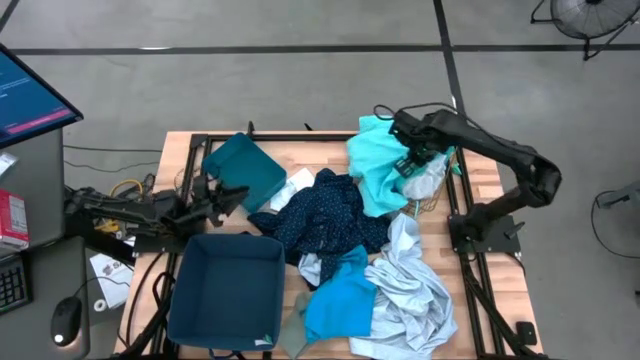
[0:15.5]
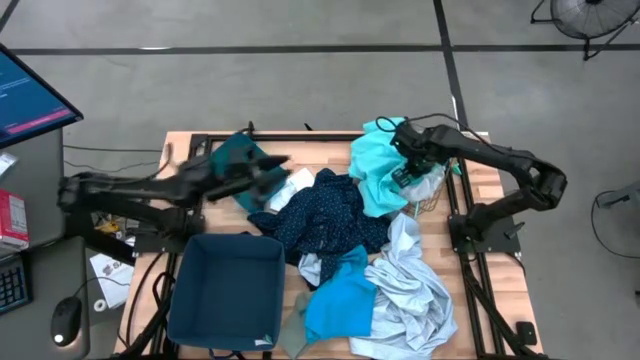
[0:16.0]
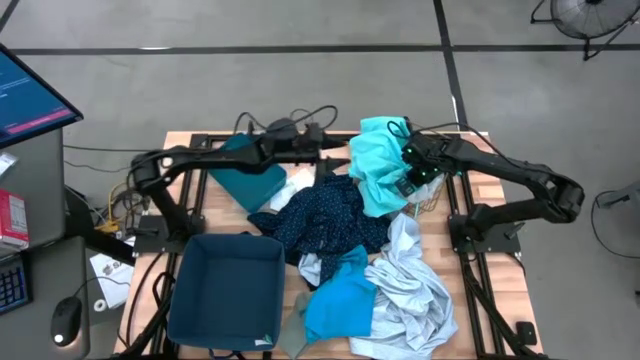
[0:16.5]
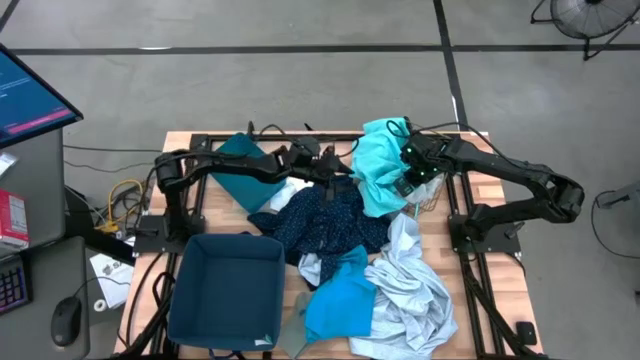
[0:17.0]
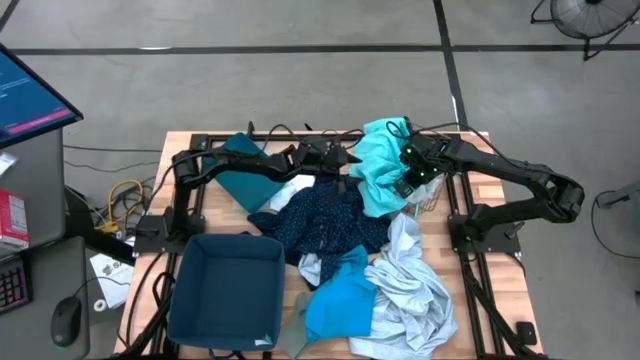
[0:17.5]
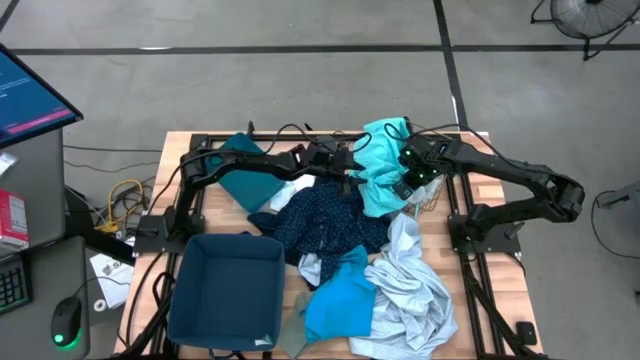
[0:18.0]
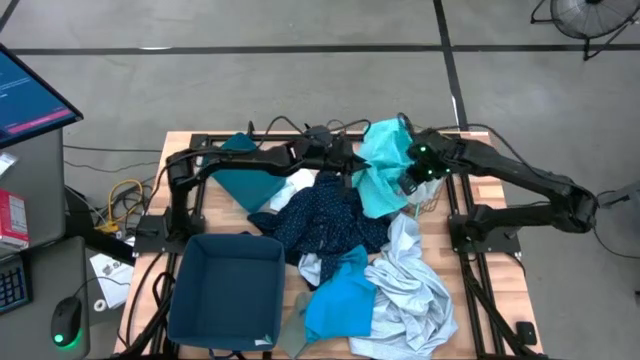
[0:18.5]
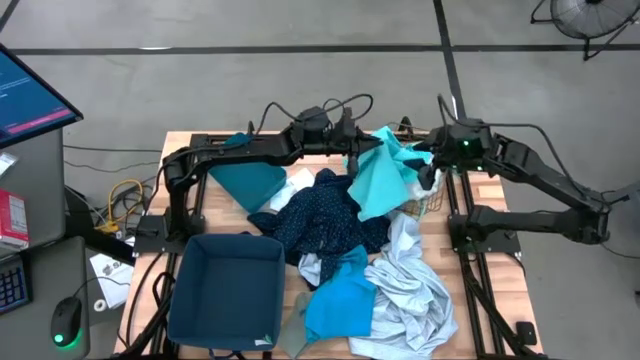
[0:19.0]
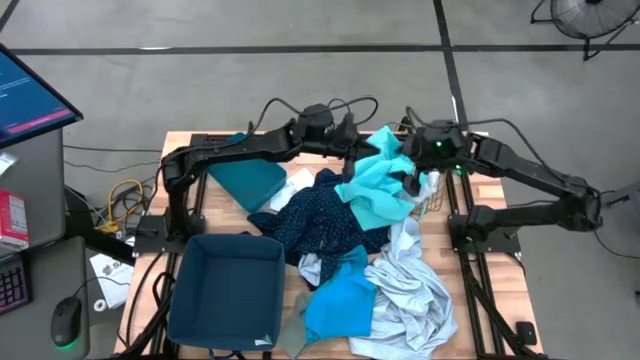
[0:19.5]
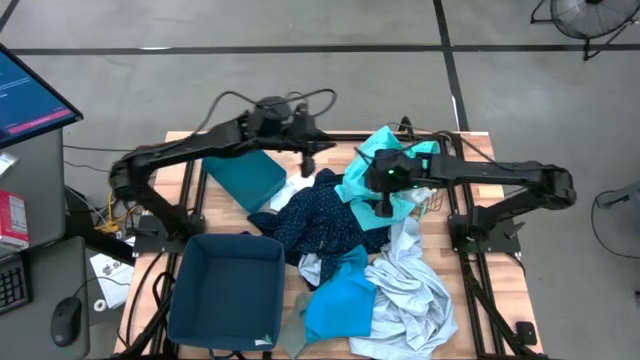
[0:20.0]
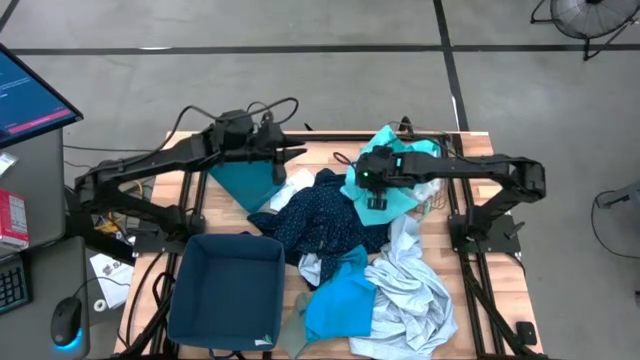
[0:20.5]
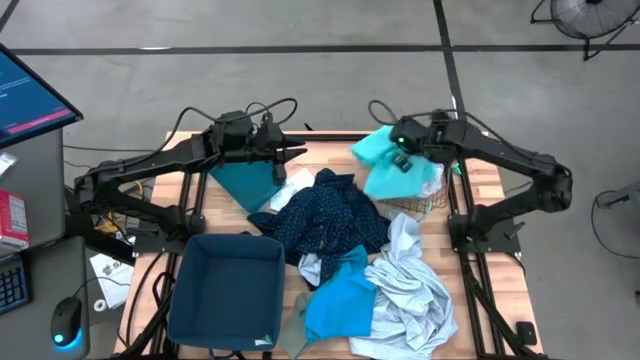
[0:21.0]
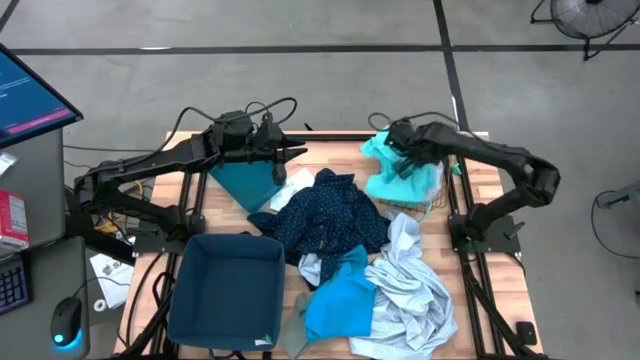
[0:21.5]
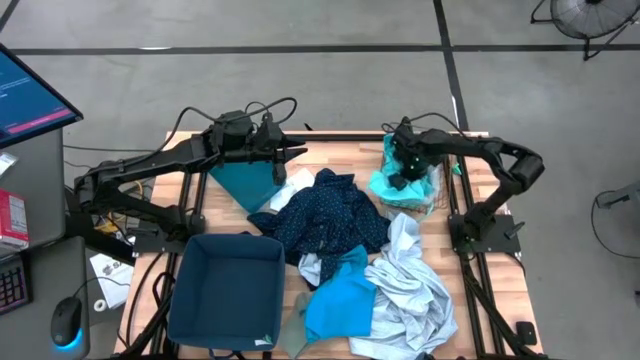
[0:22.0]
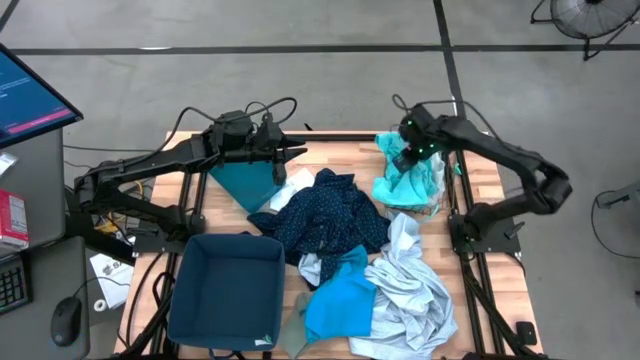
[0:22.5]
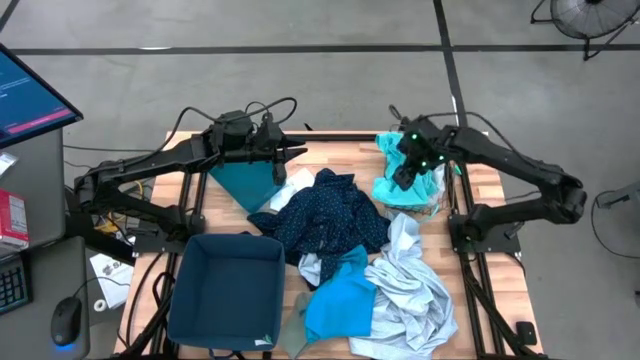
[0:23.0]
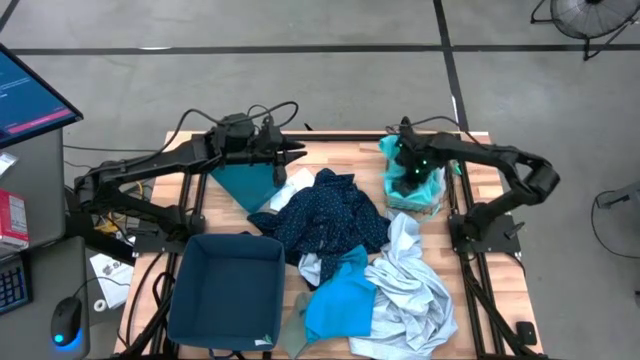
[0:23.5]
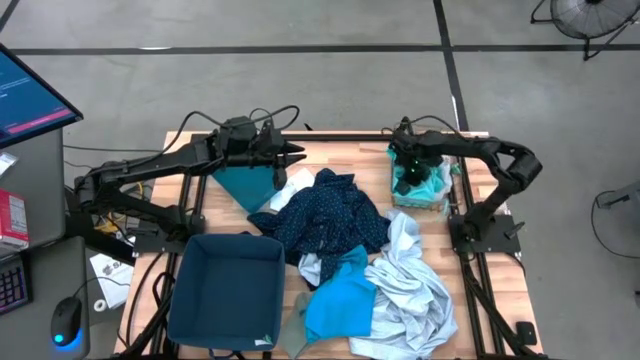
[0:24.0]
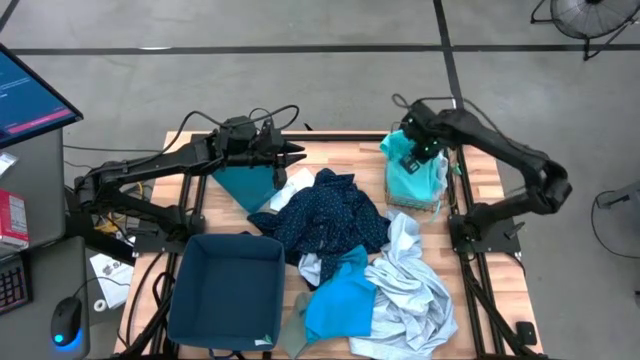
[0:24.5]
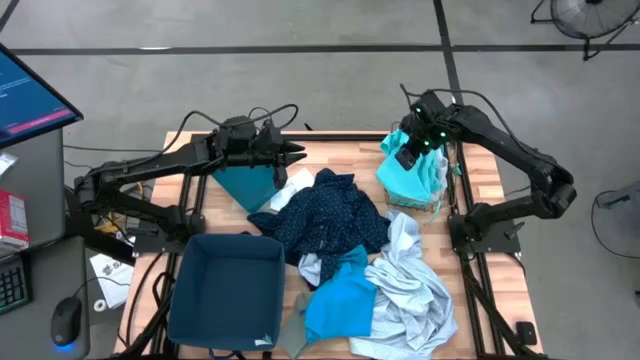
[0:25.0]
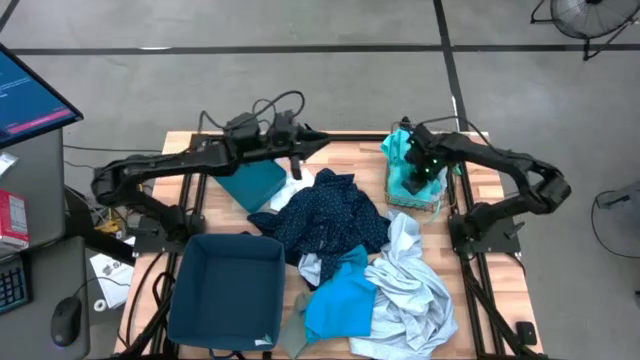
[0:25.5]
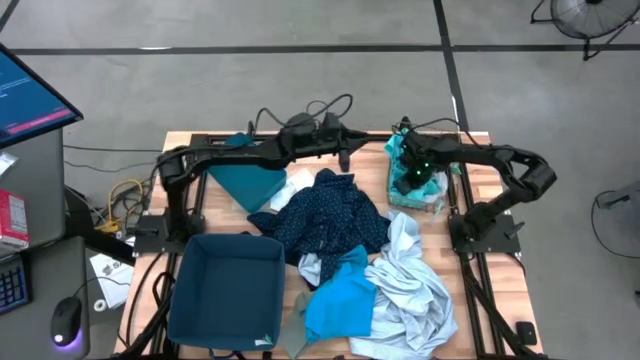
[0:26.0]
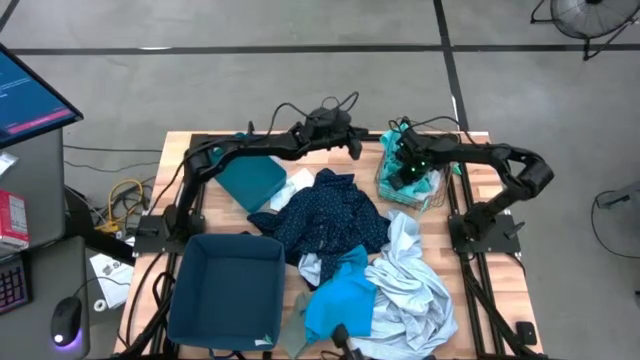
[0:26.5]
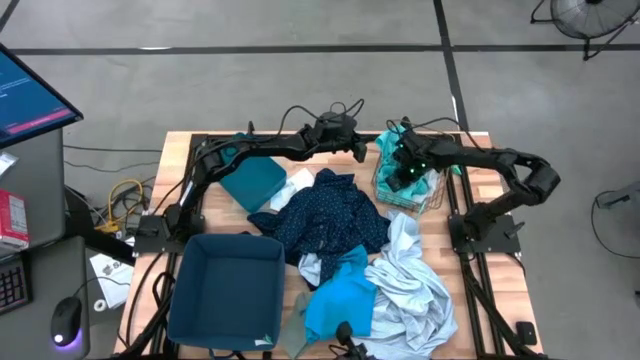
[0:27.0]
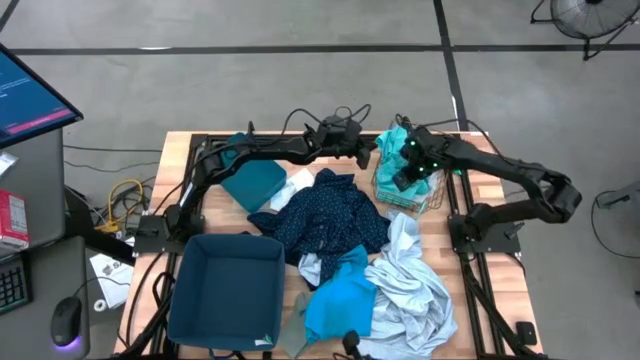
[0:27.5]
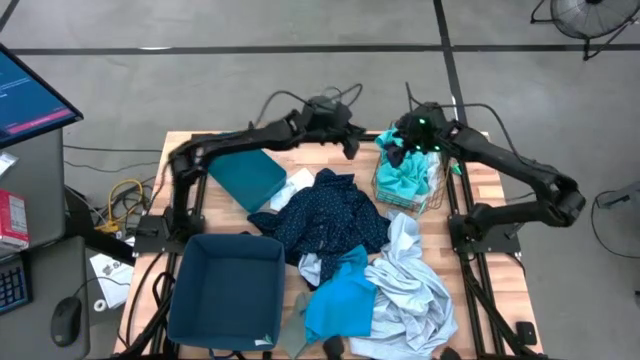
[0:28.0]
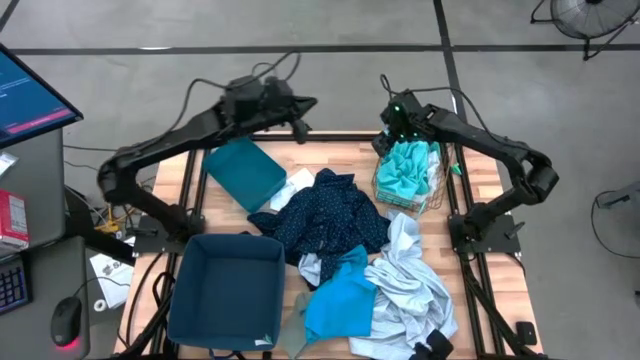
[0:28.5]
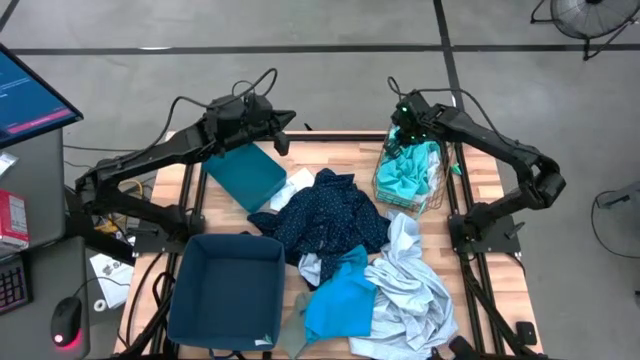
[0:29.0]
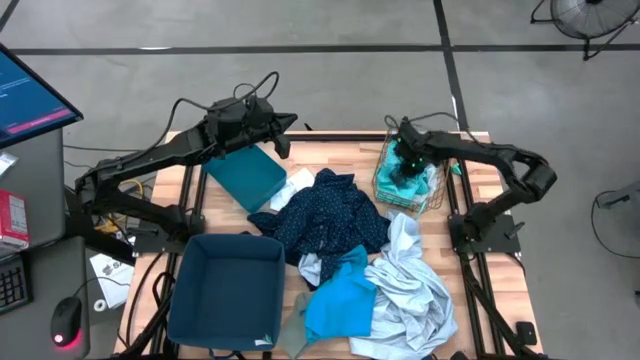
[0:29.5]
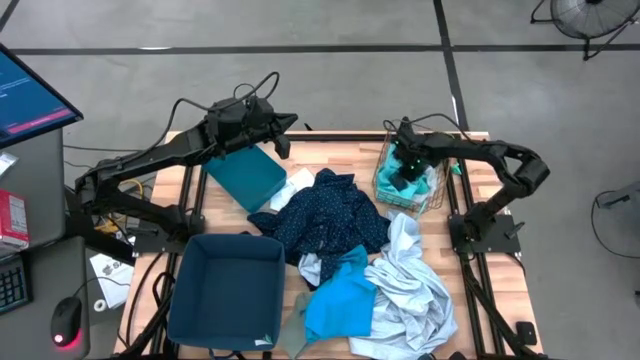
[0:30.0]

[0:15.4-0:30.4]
Task: Pick & Place Cloths
Put the light blue shorts into the wire basket

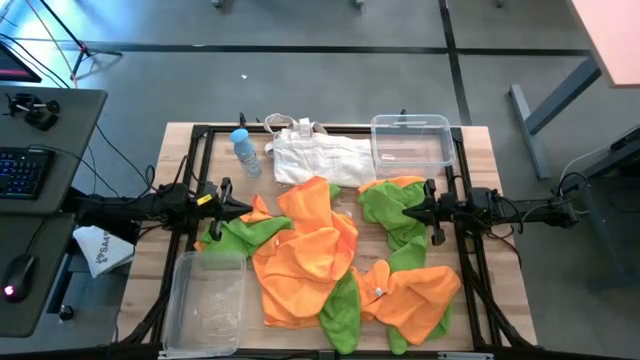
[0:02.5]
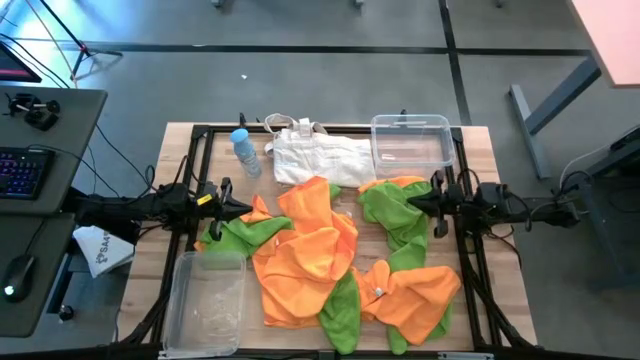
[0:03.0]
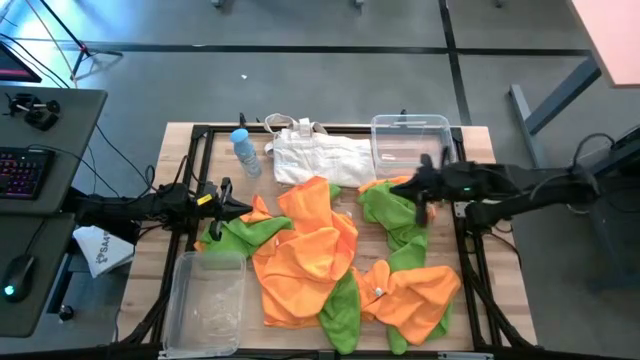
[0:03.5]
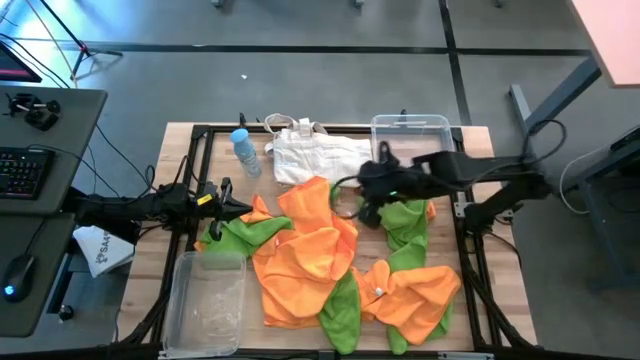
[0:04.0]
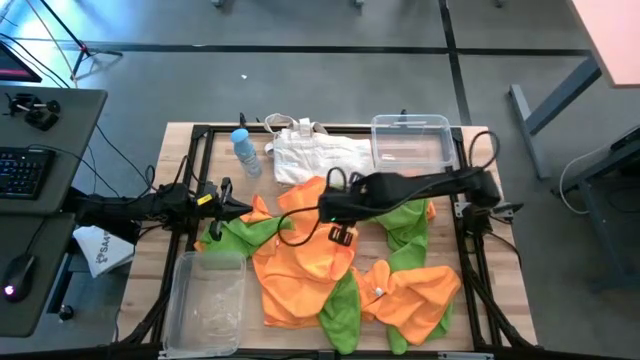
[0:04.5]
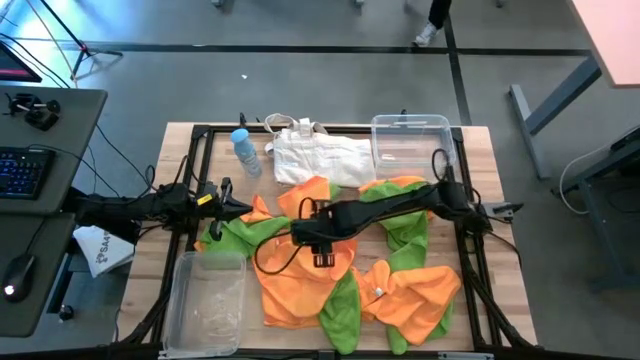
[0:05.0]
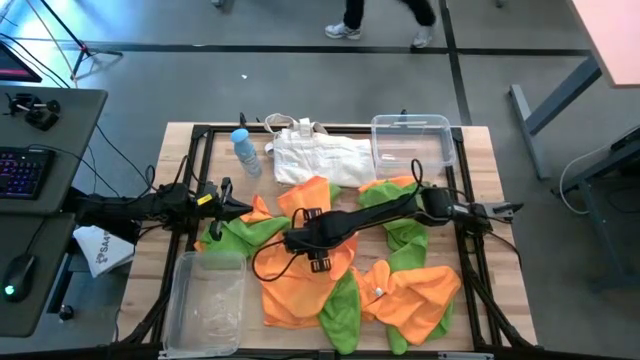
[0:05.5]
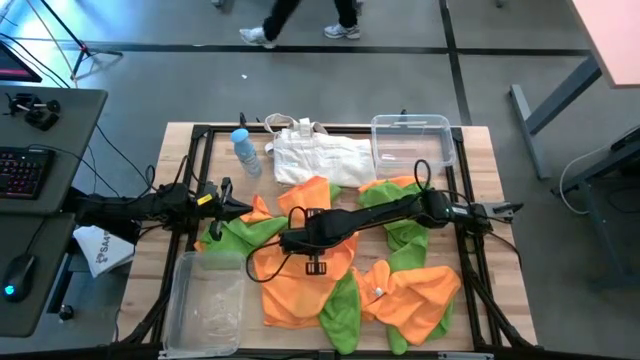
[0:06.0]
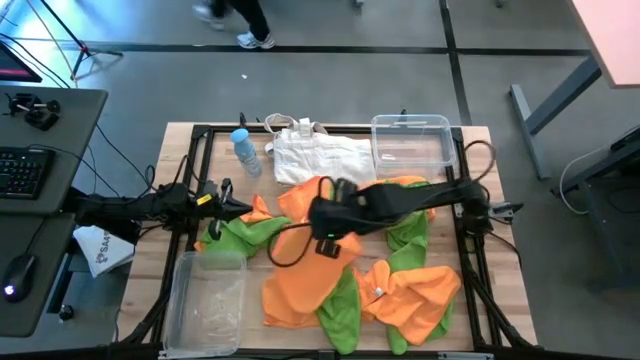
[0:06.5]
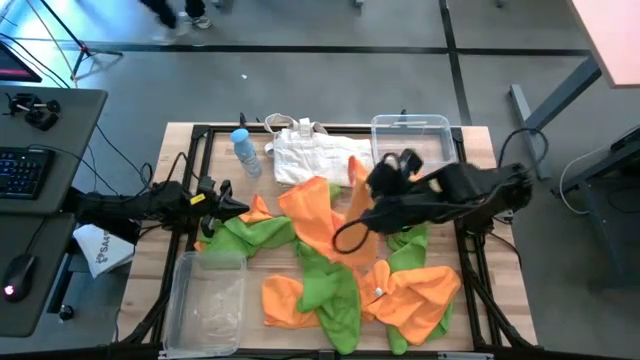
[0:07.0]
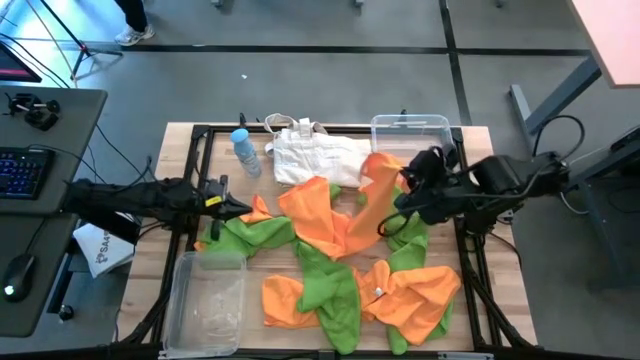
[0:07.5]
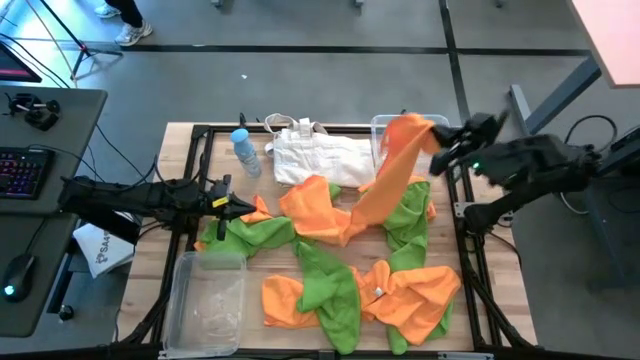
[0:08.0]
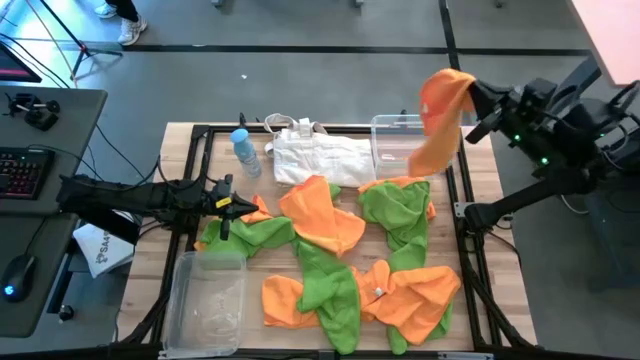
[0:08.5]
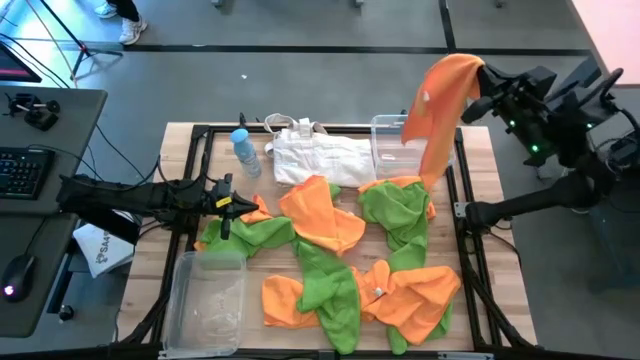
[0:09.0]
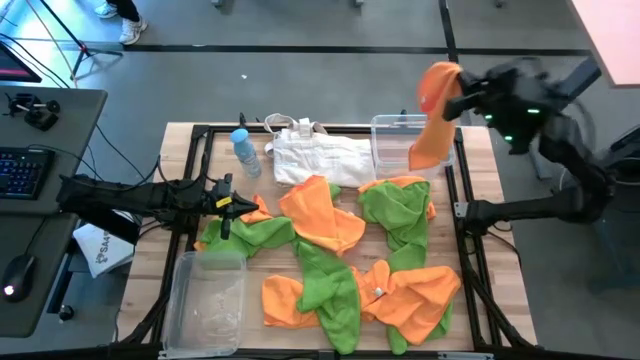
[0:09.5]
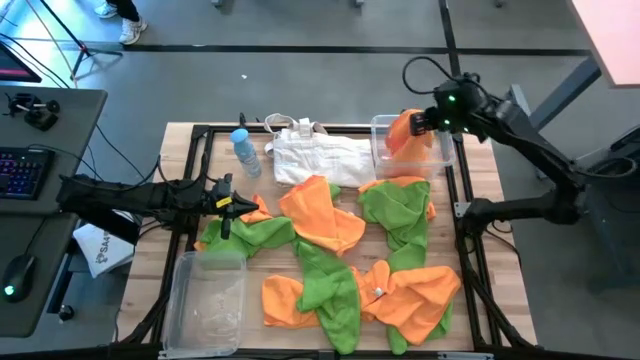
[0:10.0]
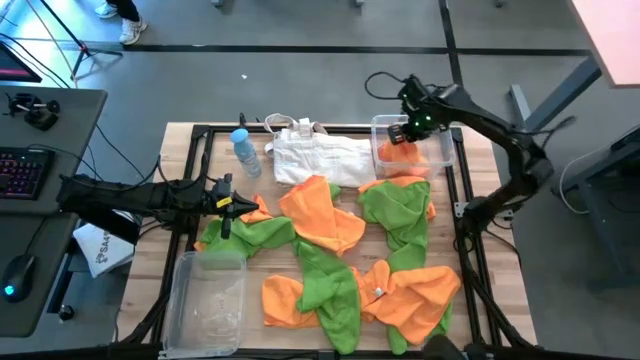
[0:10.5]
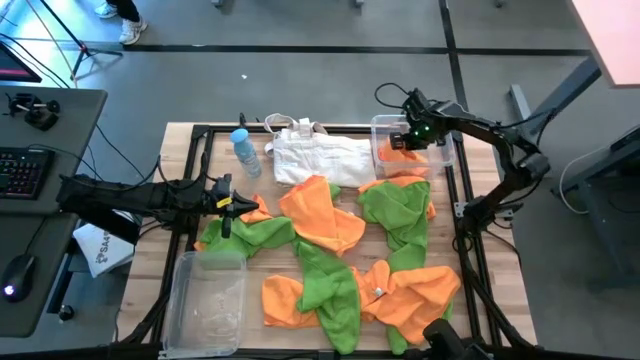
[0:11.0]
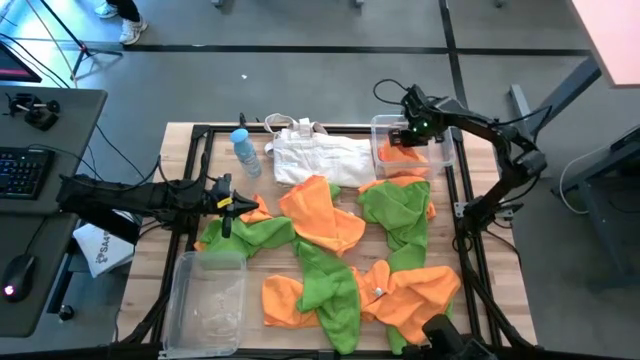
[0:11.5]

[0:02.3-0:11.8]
Task: Sort microfiber towel by color & place in baskets
Put the orange microfiber cloth into the top transparent bin
